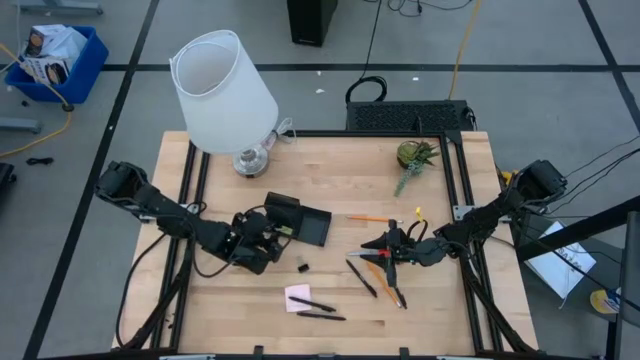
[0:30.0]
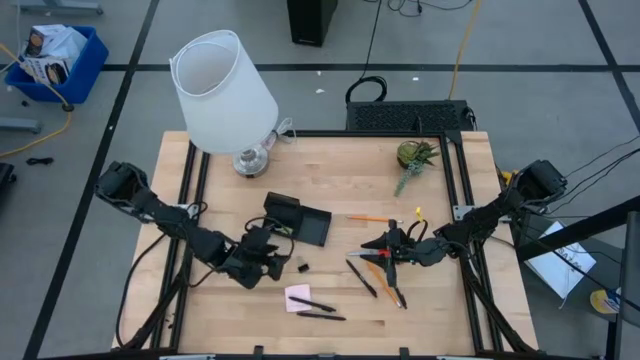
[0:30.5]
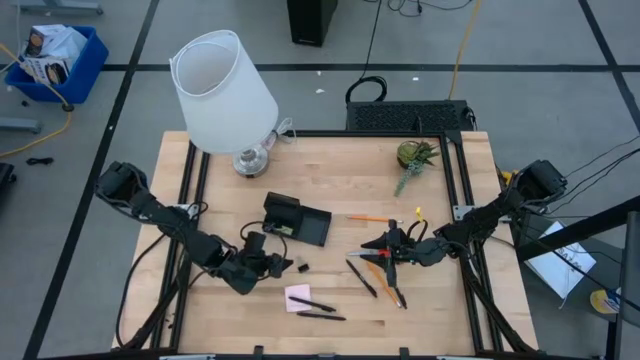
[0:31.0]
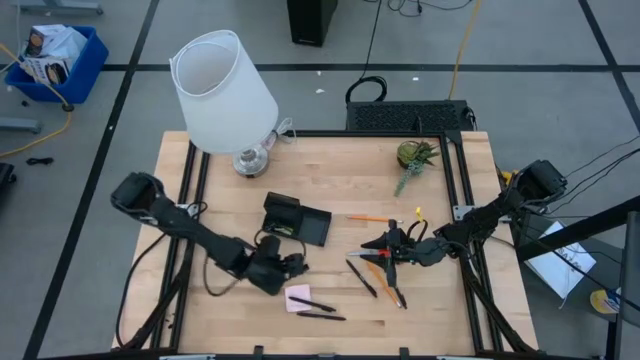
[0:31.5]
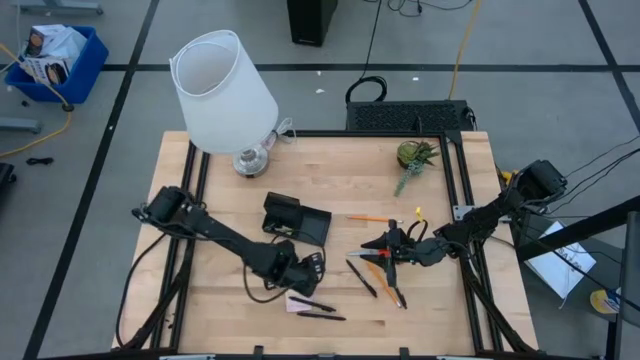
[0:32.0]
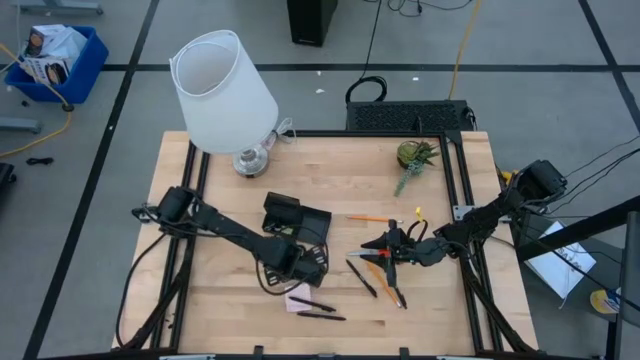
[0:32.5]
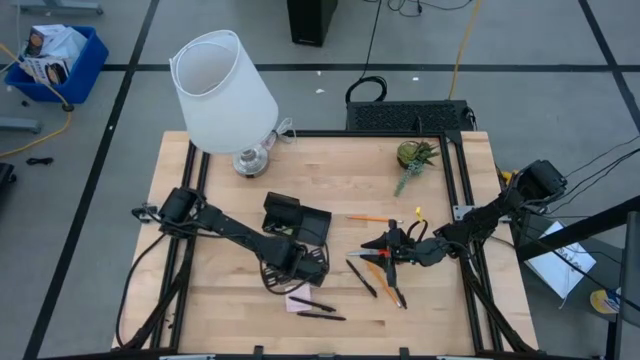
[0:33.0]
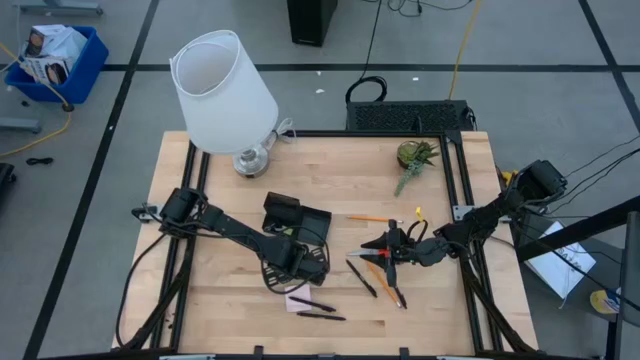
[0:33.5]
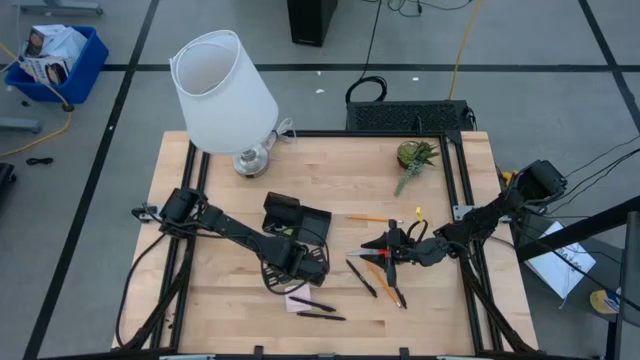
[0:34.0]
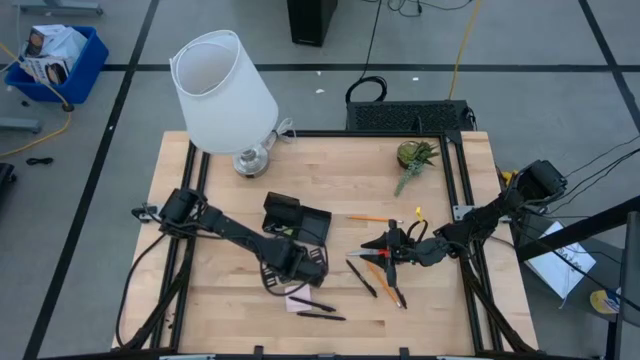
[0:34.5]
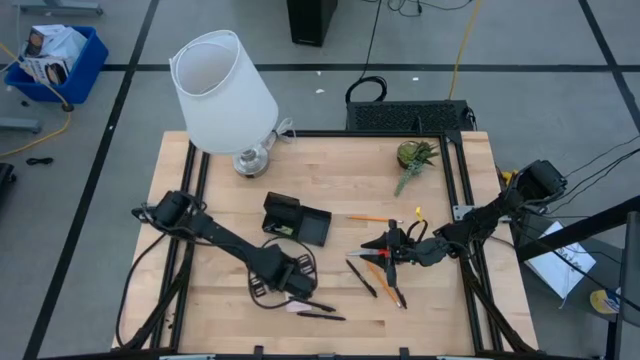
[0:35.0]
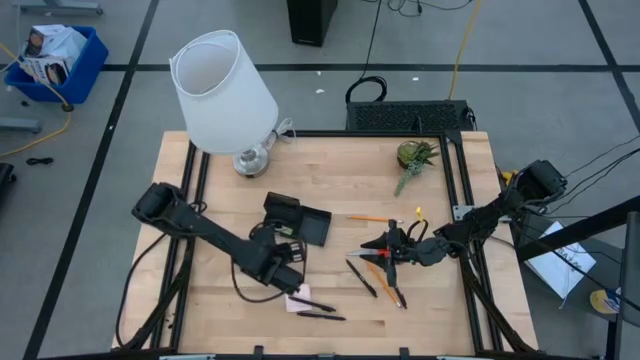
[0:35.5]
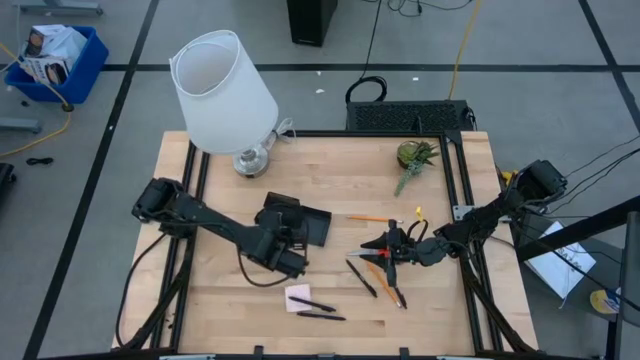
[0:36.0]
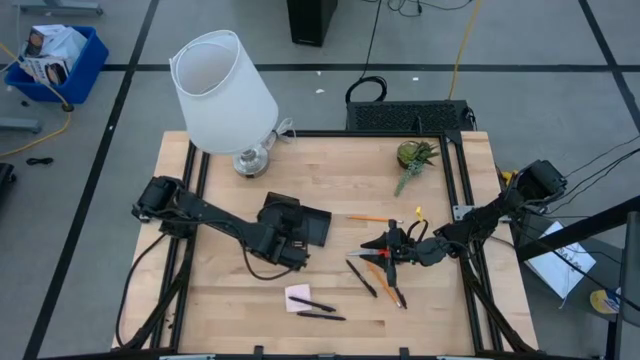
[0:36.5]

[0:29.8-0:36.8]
Task: Pick and place office supplies into organizer
Put the black binder clip into the black desk organizer

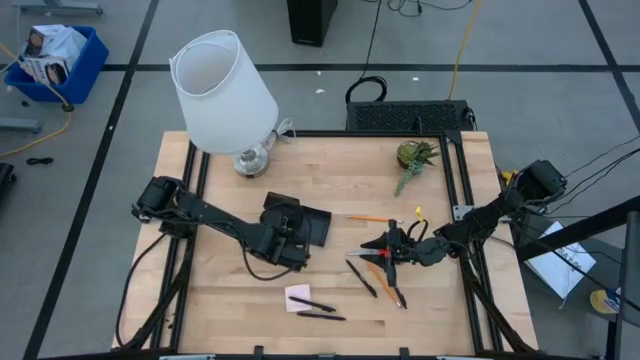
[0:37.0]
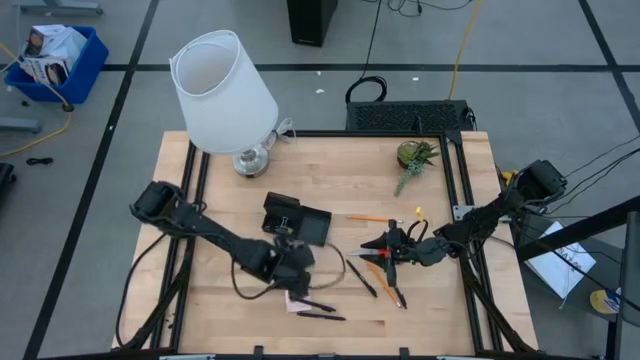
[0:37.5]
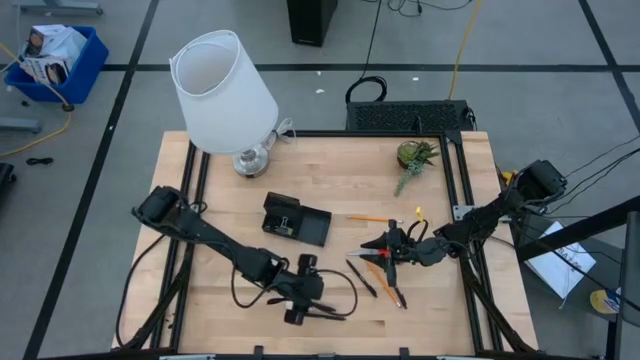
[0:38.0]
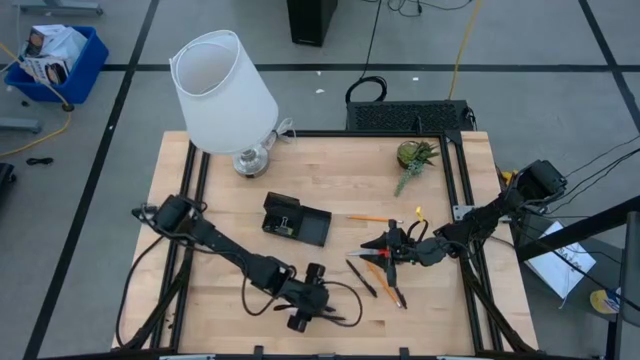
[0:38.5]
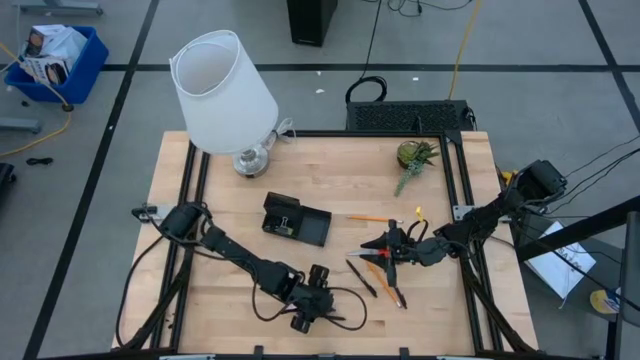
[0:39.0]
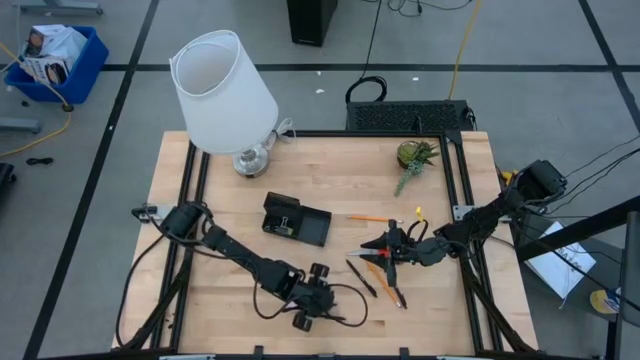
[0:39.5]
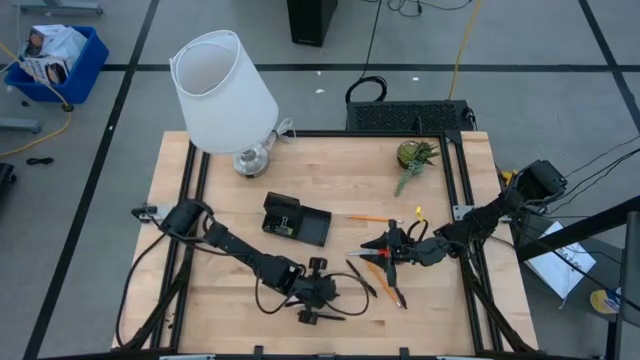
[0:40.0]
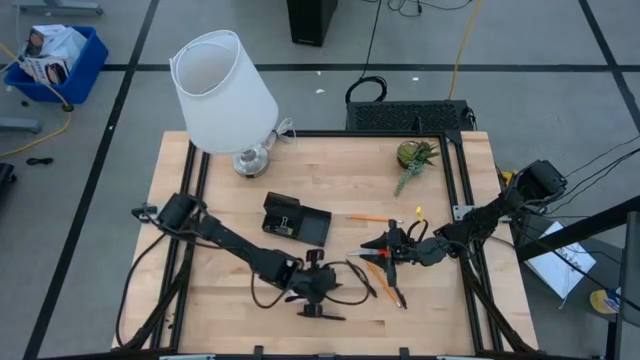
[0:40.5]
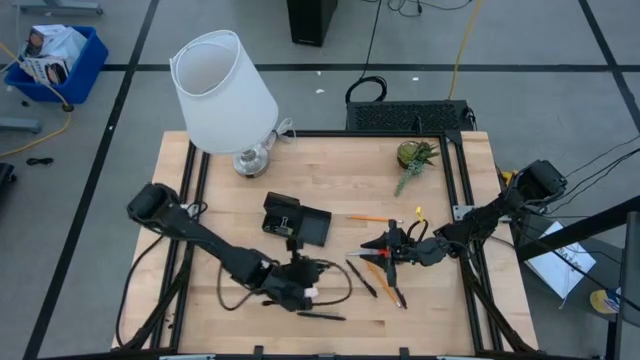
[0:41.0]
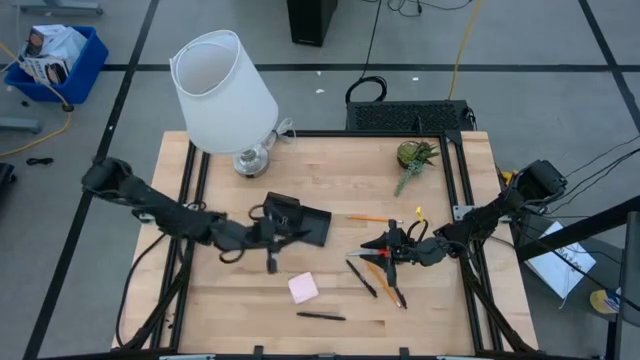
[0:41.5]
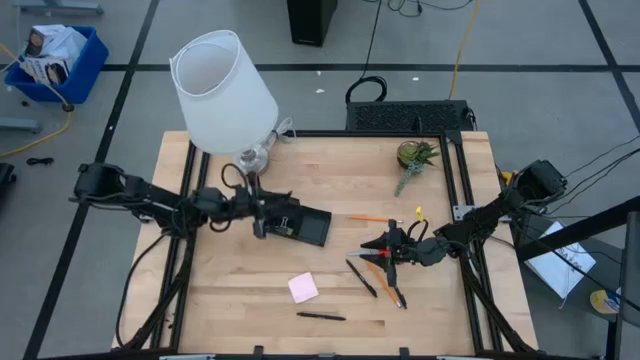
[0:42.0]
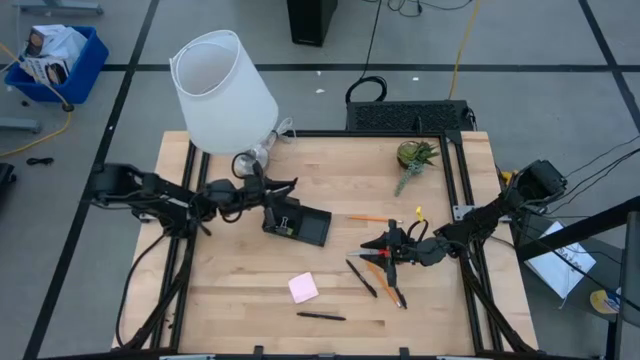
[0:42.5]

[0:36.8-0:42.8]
Put the black pen into the black desk organizer

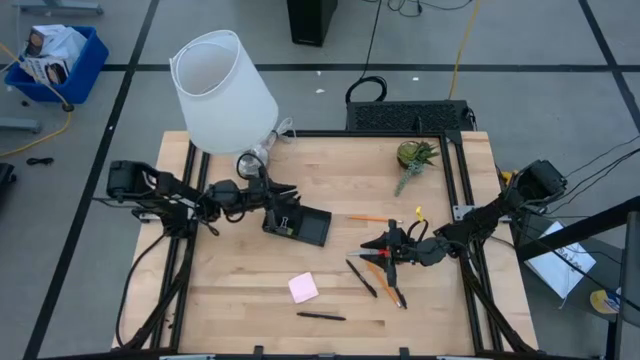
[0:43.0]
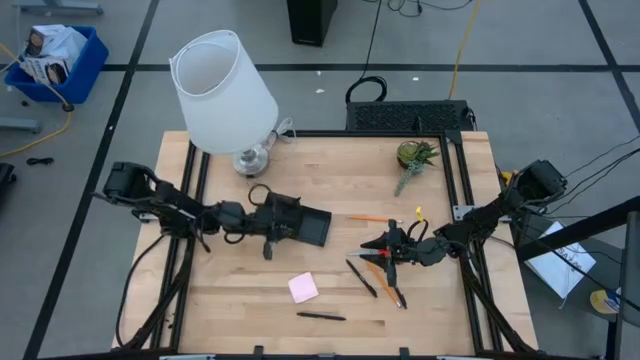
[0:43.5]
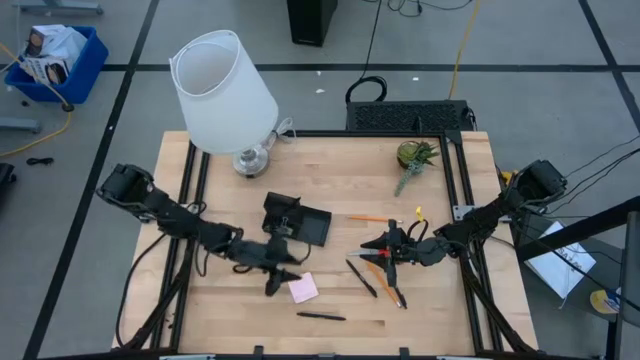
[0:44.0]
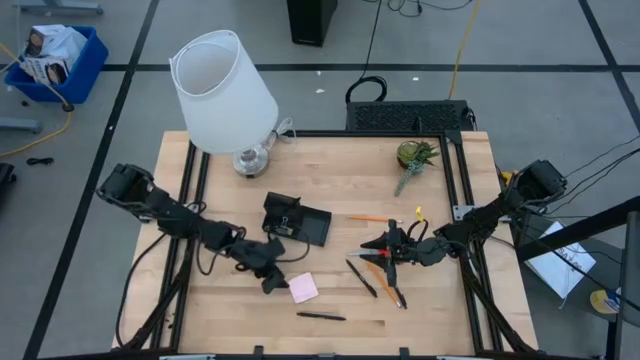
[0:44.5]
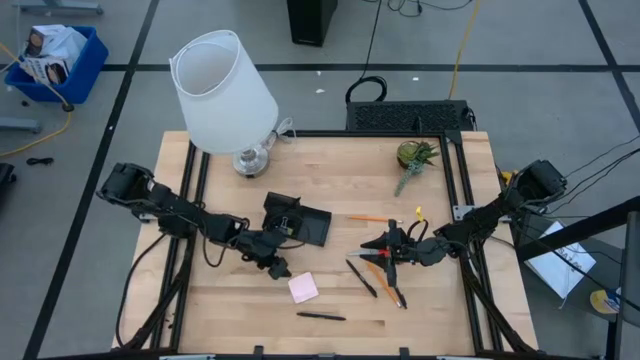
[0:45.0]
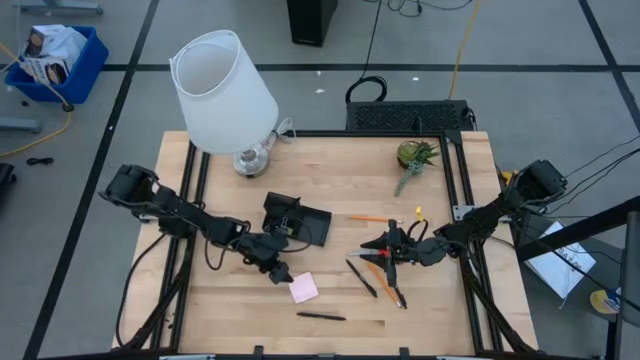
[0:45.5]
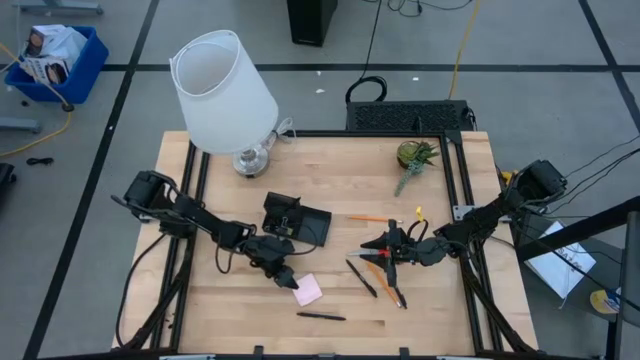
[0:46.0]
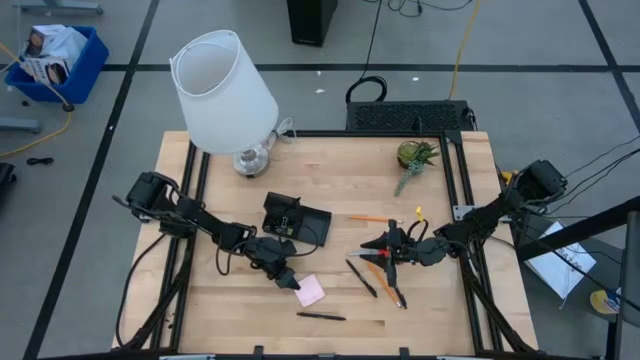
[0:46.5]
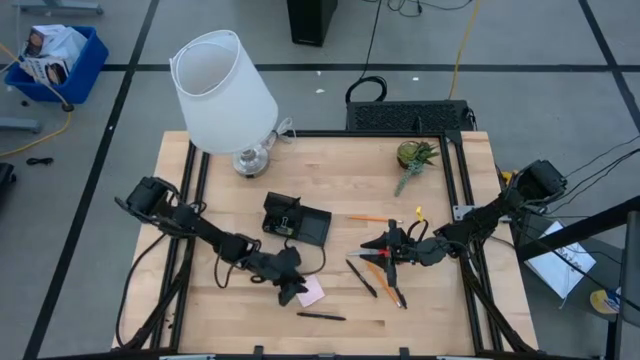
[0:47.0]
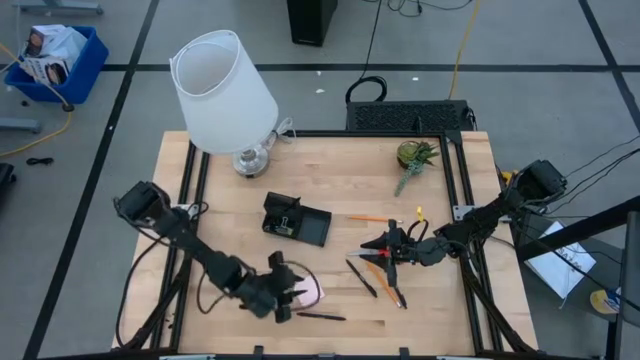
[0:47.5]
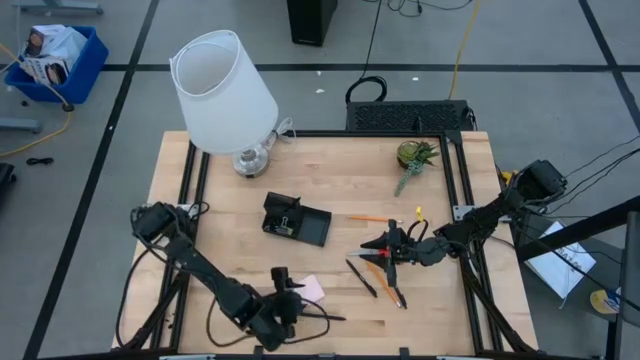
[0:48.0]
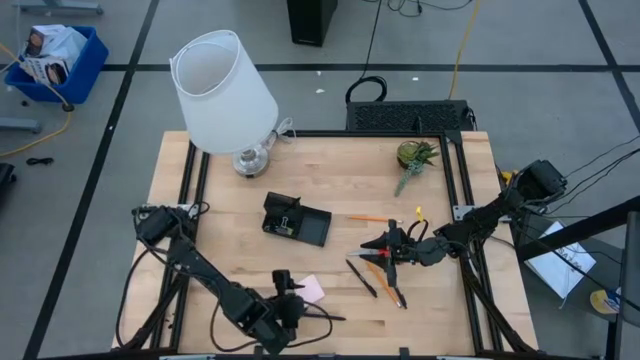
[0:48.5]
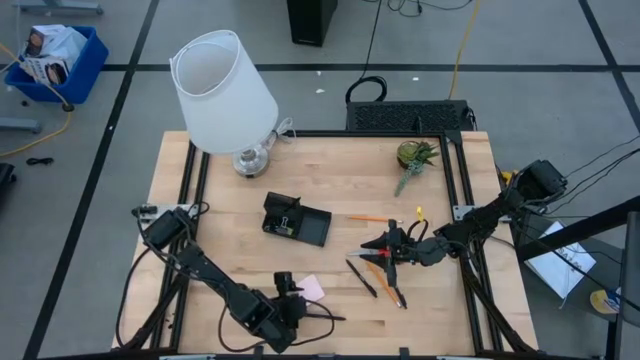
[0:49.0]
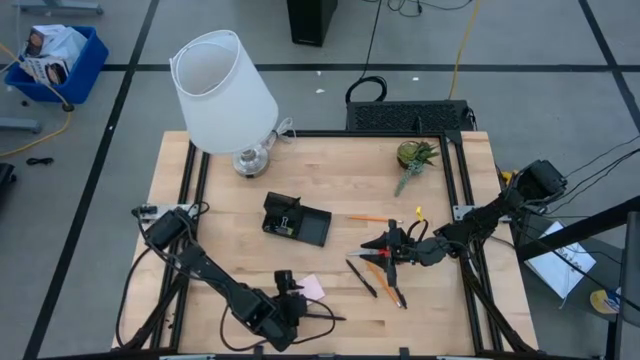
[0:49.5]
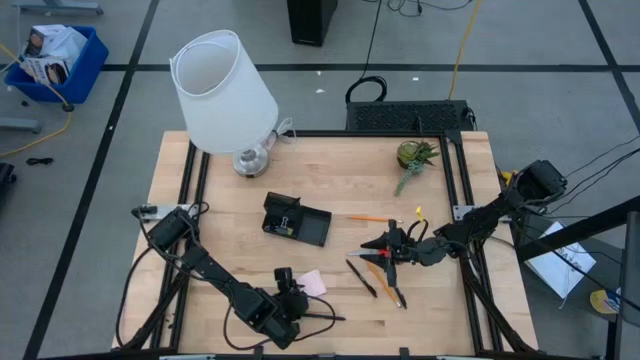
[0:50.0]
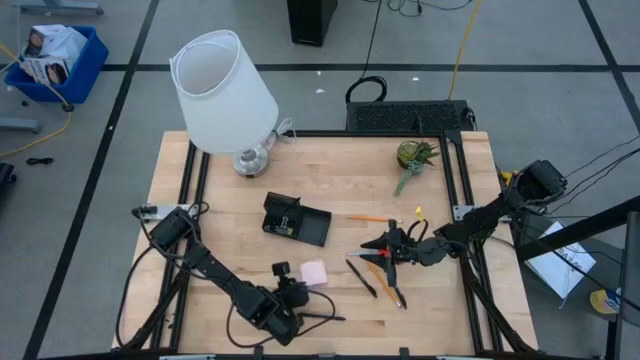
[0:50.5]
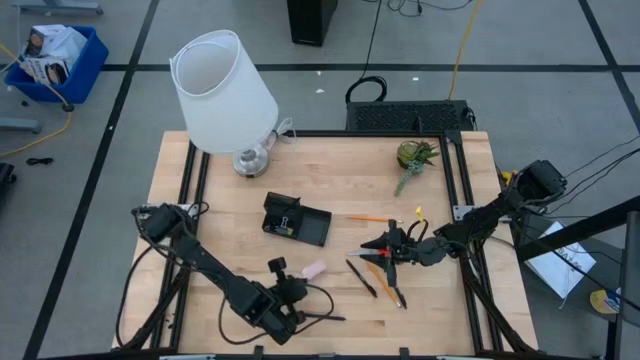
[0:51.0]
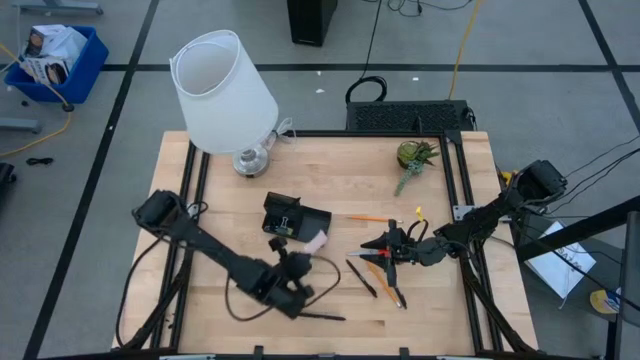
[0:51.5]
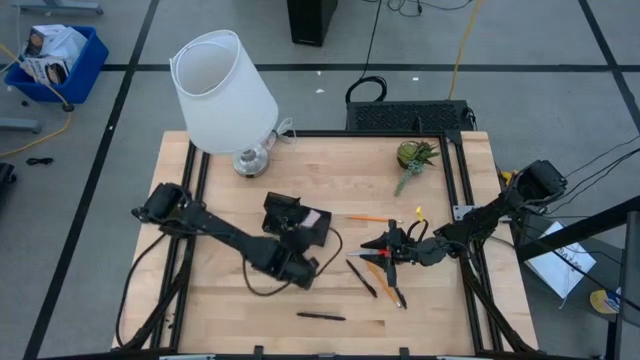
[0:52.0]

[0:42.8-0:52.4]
Put the pink sticky notes into the black desk organizer
